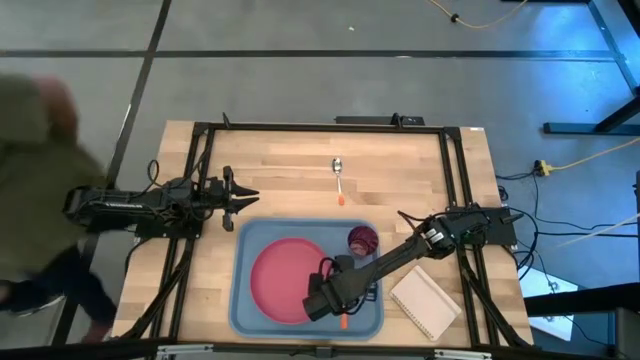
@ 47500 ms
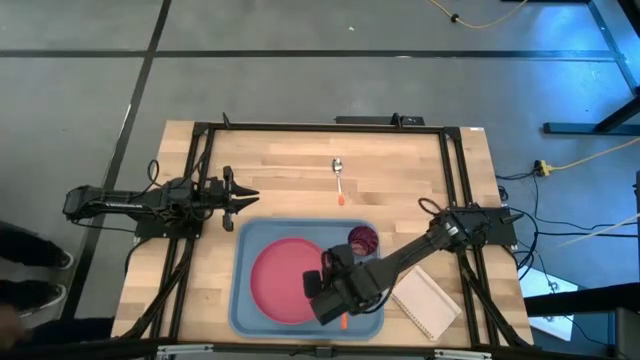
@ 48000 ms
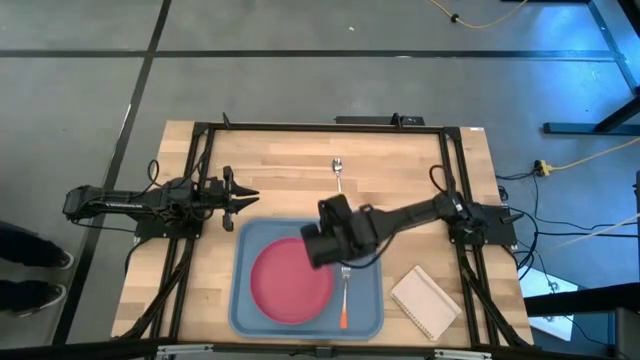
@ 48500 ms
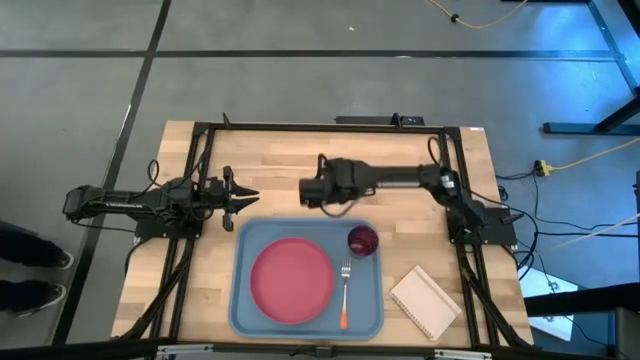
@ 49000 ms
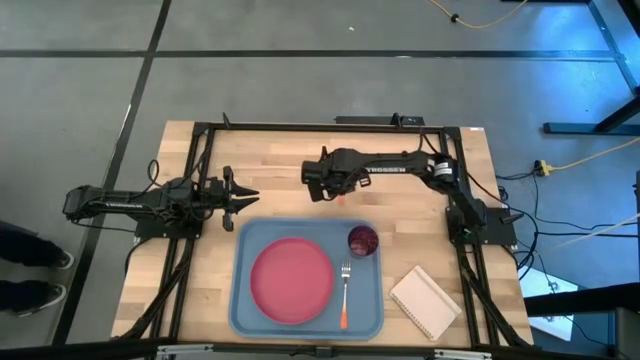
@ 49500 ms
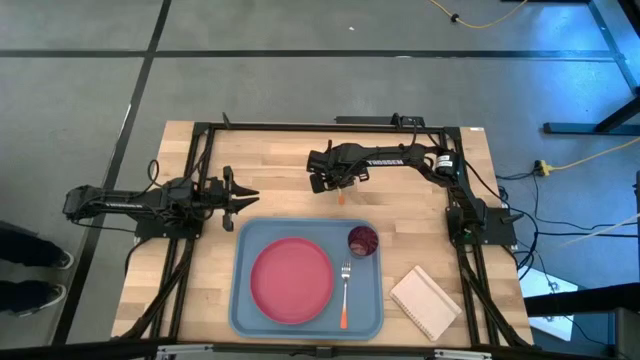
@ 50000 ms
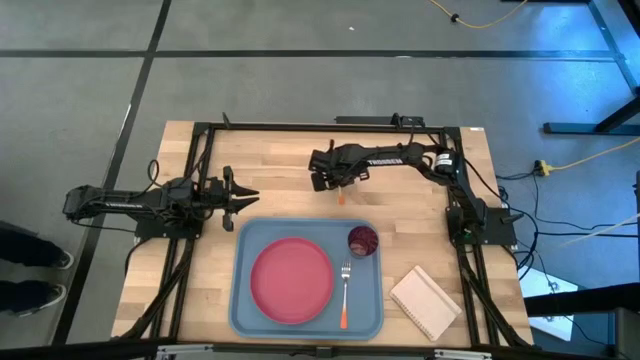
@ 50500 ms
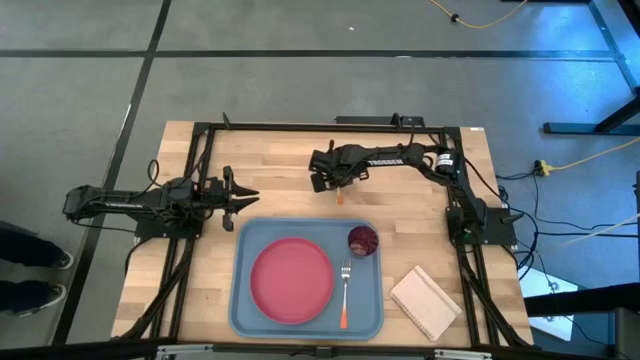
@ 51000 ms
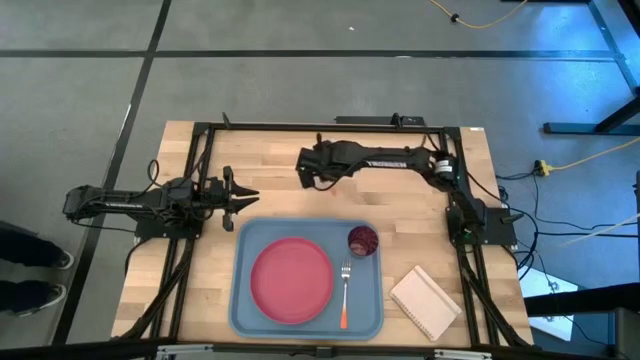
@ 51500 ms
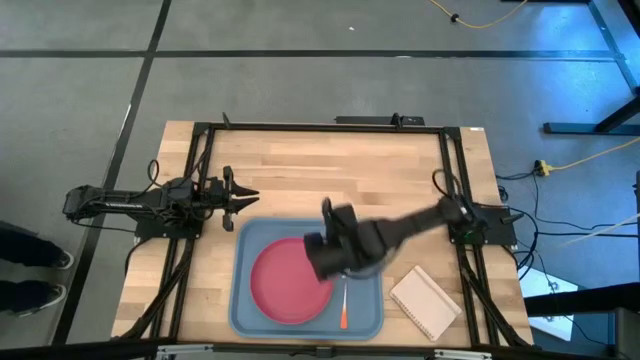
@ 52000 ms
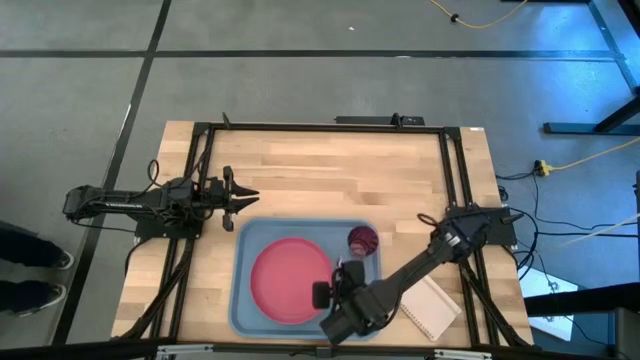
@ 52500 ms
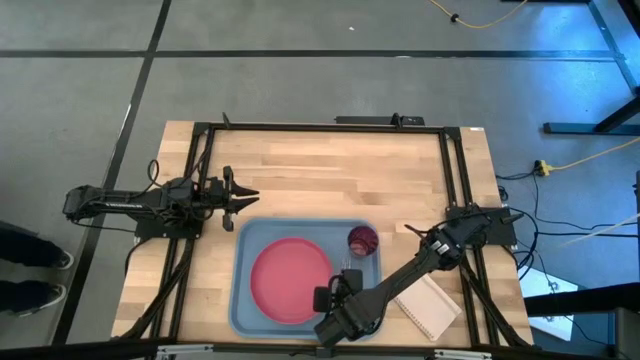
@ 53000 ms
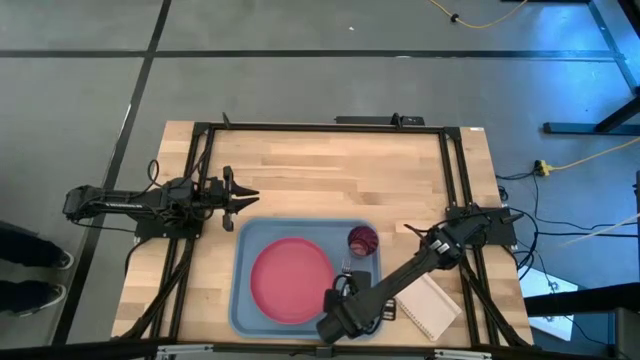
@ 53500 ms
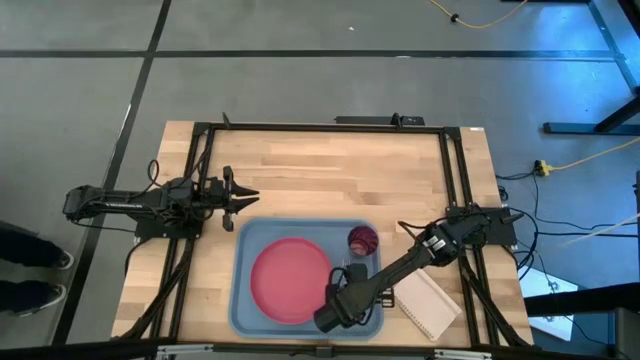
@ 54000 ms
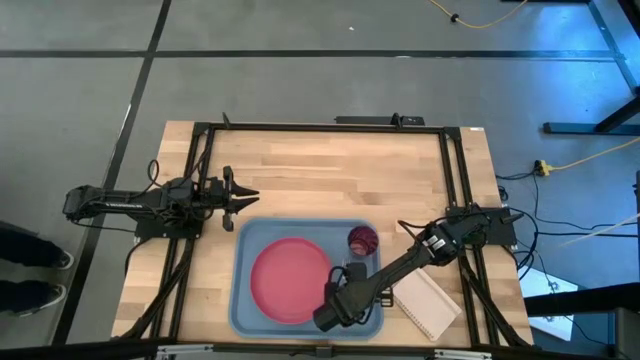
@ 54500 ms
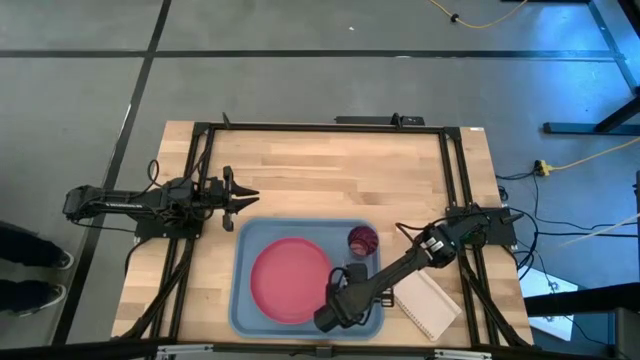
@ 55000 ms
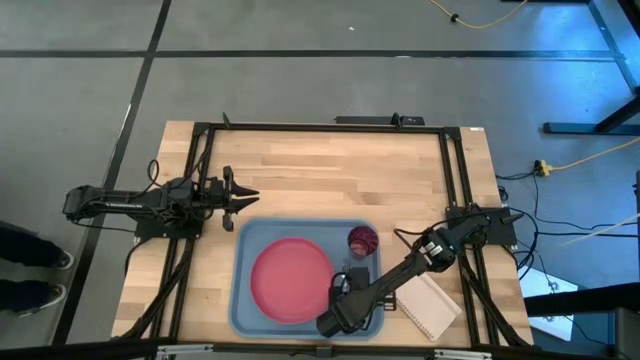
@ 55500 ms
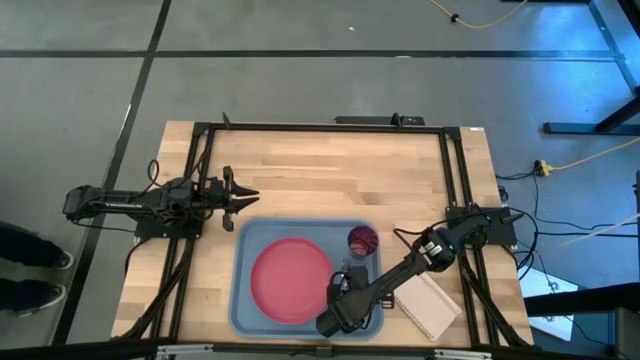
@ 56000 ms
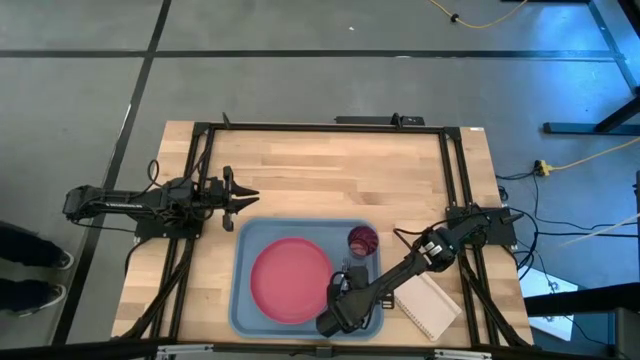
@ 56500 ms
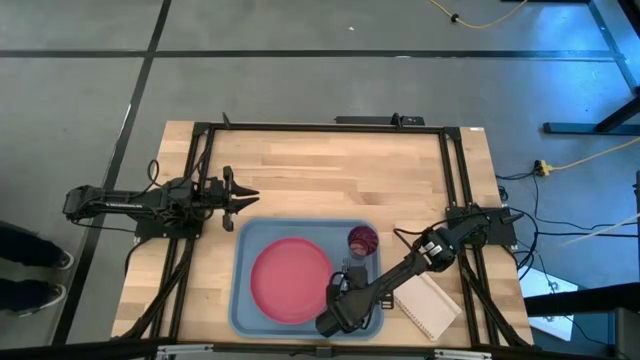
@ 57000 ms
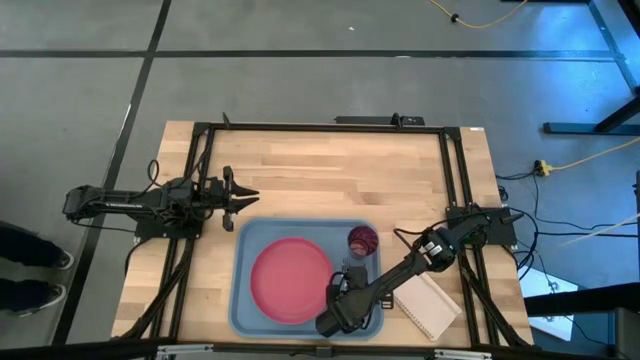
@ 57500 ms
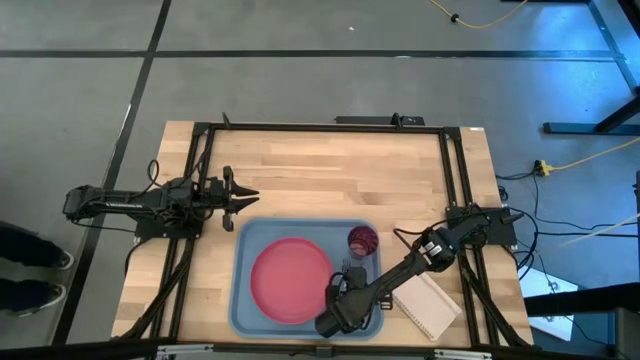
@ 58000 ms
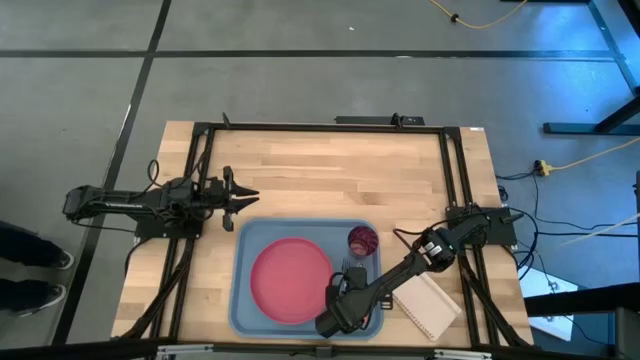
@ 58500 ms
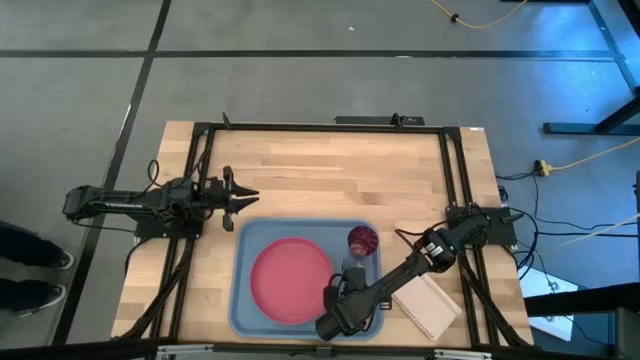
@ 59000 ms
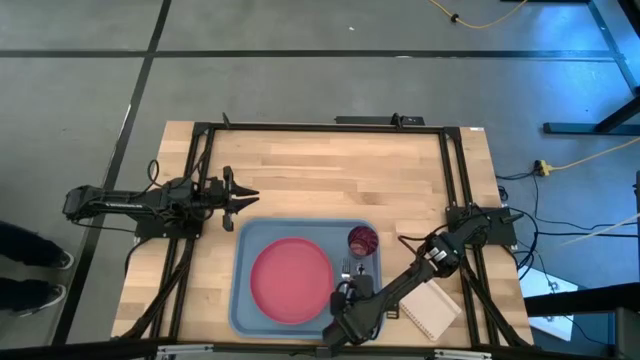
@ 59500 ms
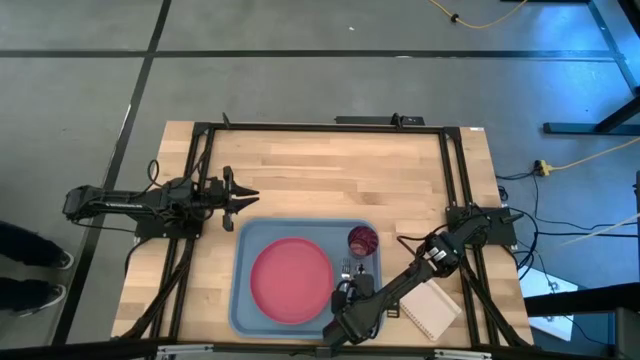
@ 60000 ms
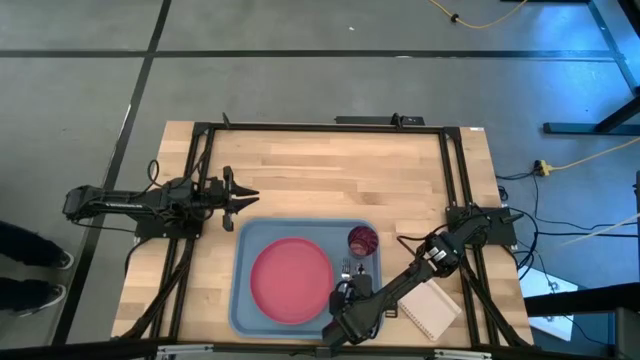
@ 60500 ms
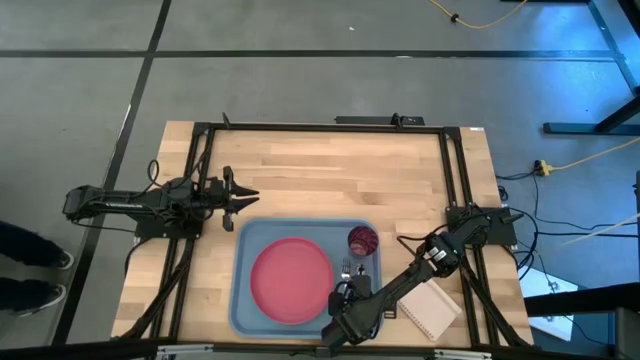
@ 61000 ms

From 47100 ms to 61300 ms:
Task: Pick and place plate/cup/fork/spoon on tray
Put the white orange spoon on the right side of the white orange fork

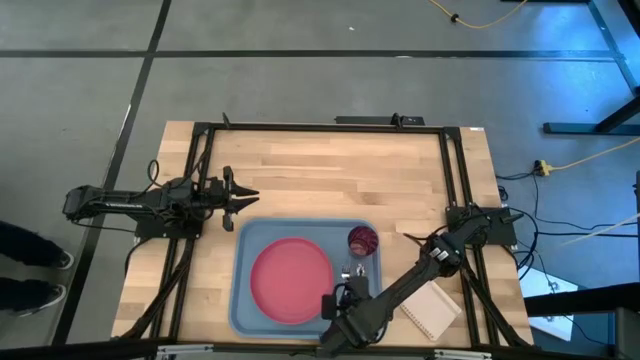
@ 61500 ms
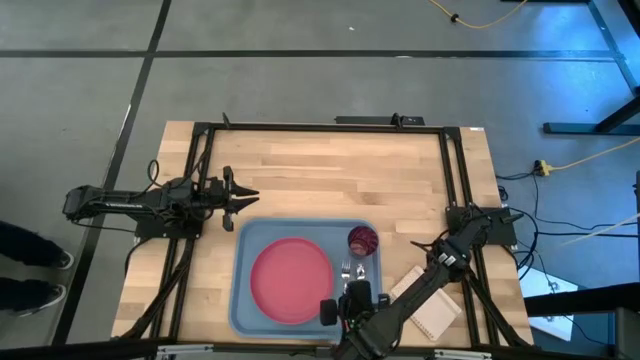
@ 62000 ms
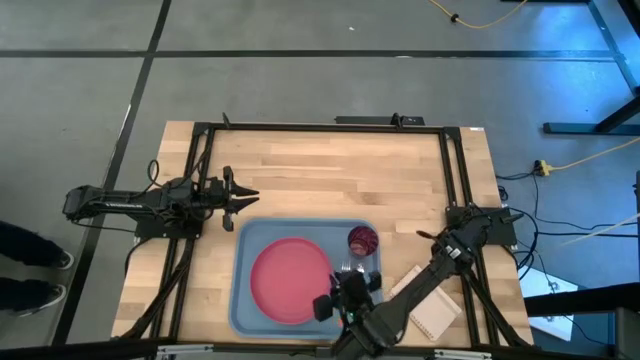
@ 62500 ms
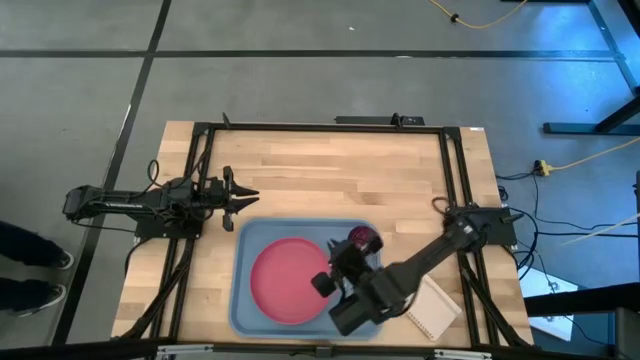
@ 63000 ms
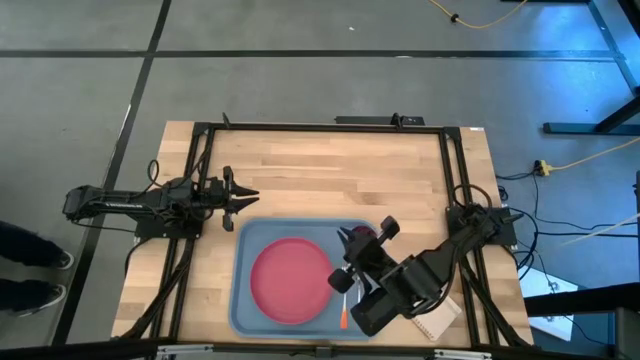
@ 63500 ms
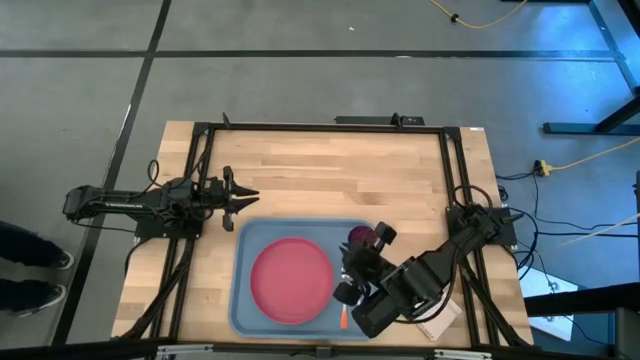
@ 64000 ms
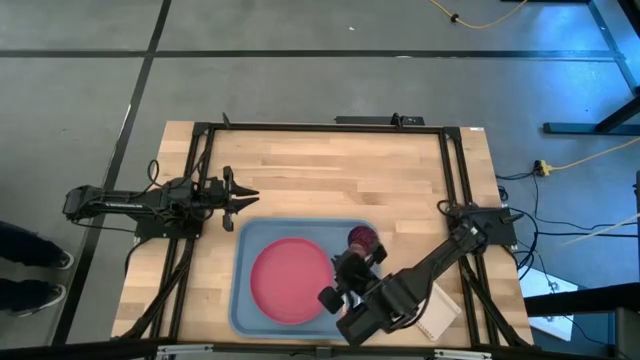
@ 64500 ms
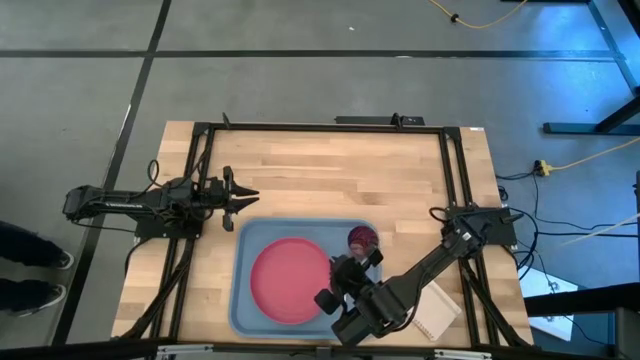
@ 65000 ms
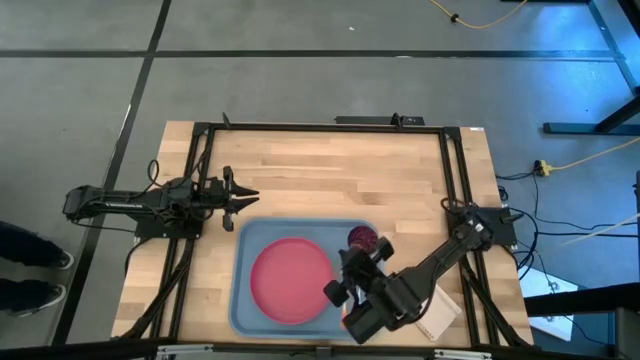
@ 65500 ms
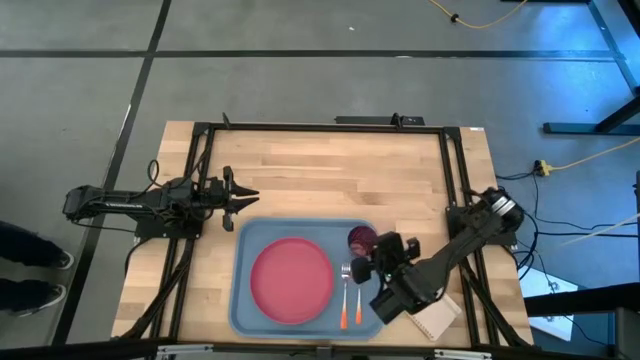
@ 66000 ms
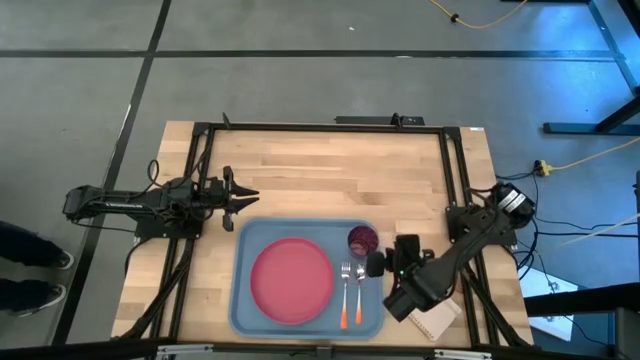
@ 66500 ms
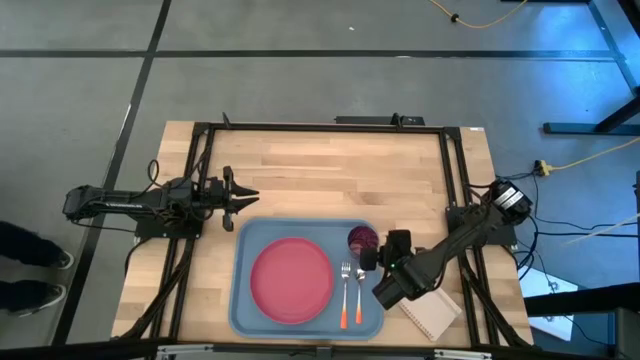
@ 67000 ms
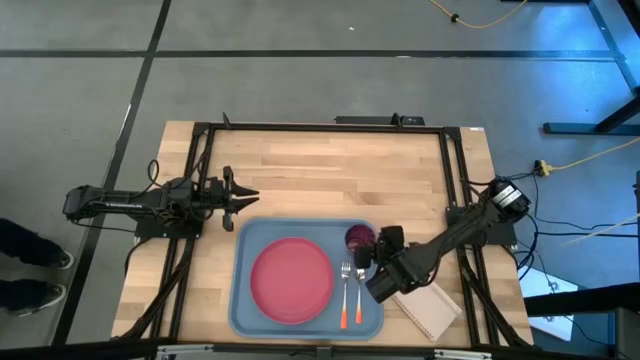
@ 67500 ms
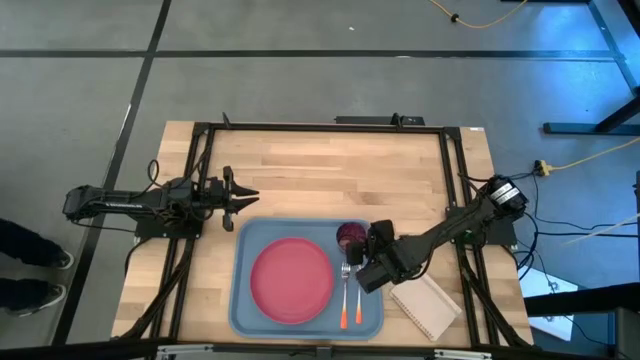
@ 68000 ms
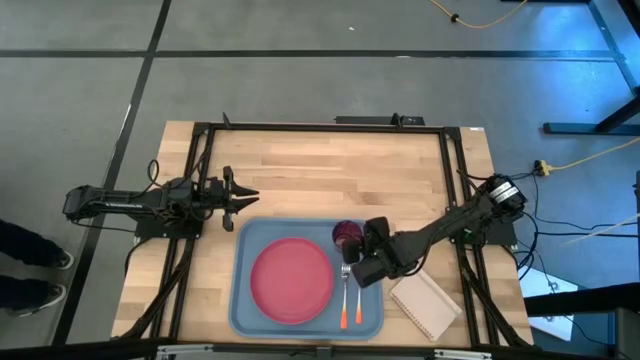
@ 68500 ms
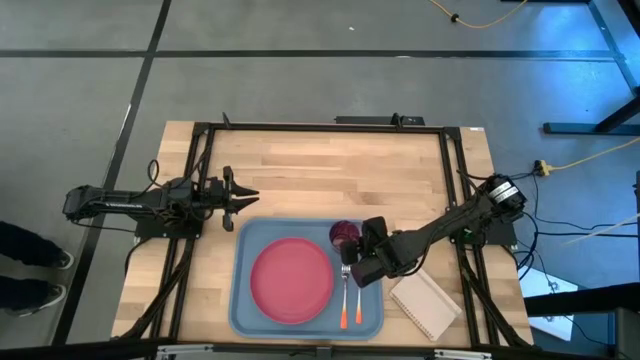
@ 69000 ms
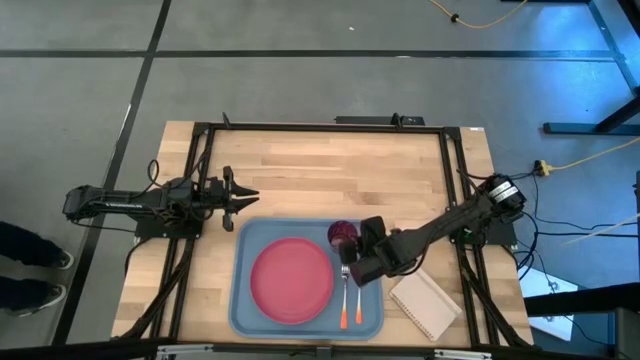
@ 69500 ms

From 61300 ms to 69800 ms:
Adjust the red cup
